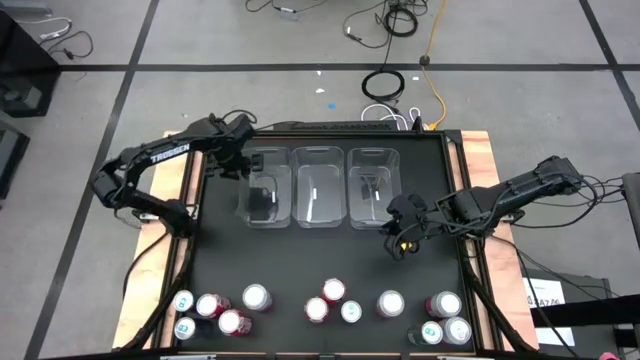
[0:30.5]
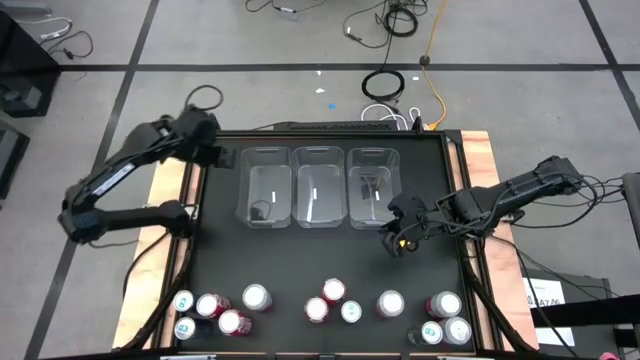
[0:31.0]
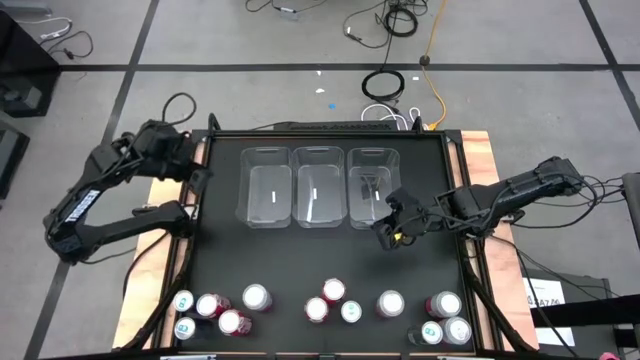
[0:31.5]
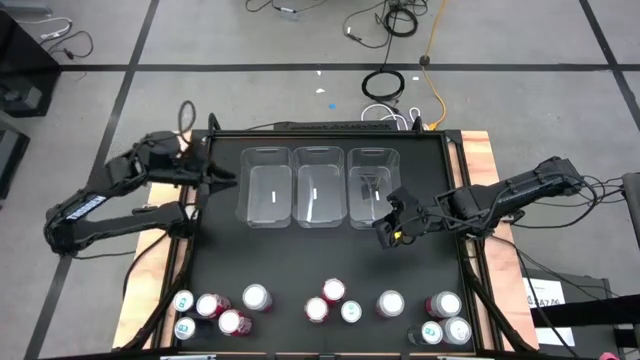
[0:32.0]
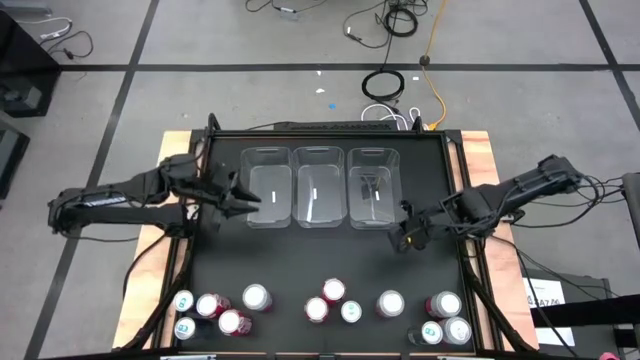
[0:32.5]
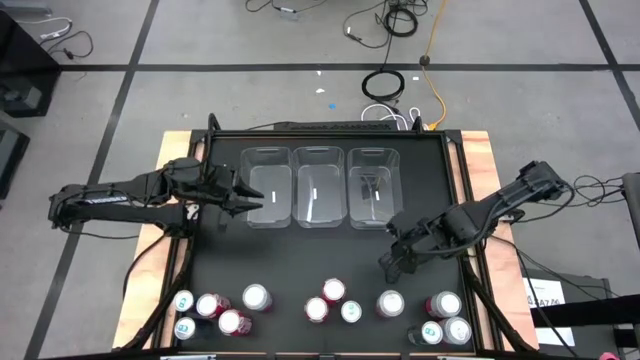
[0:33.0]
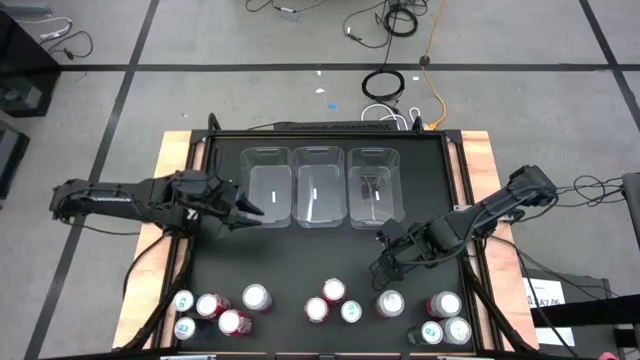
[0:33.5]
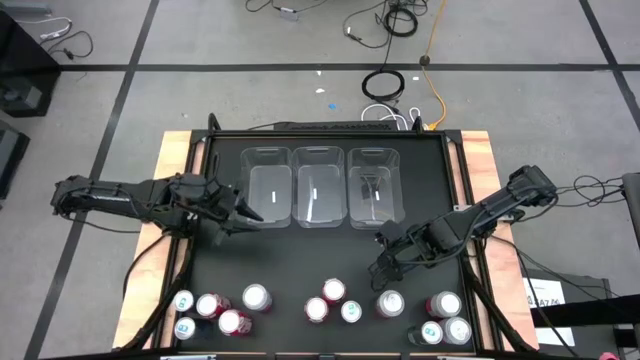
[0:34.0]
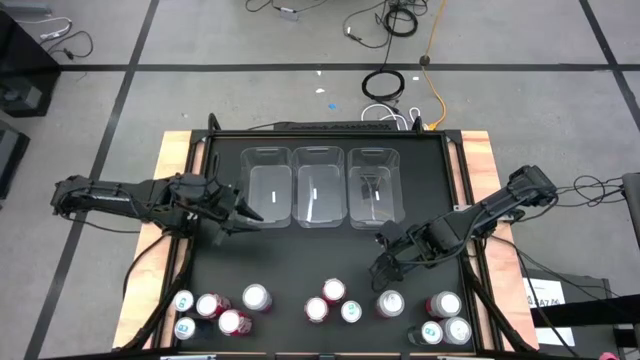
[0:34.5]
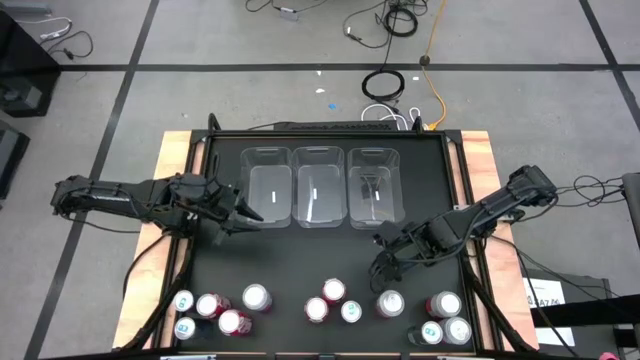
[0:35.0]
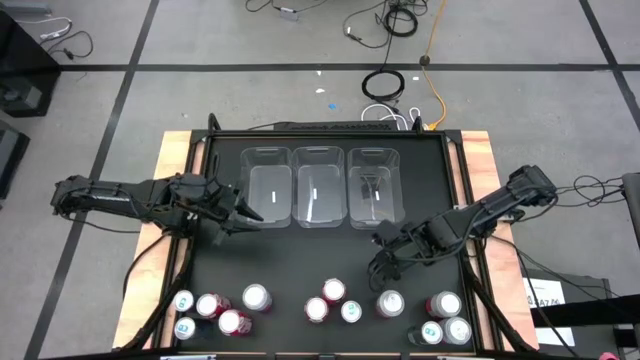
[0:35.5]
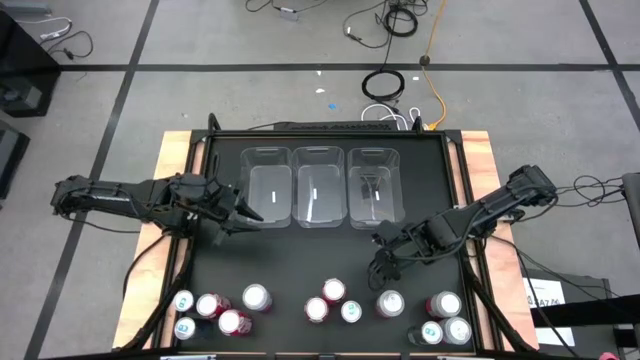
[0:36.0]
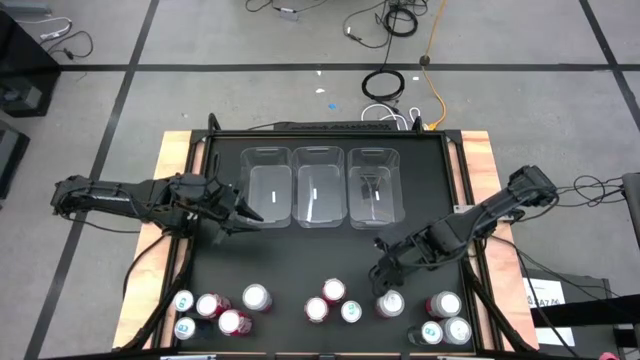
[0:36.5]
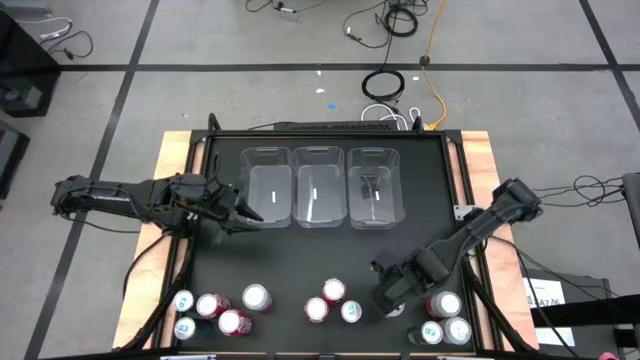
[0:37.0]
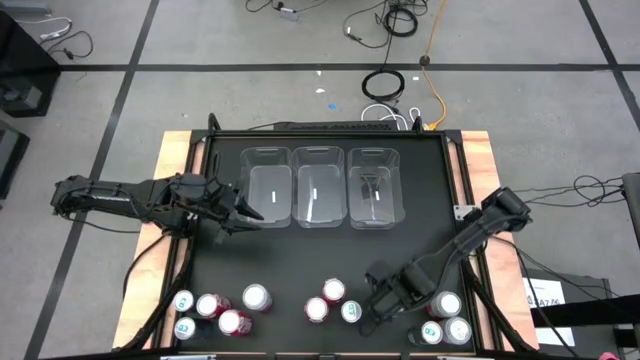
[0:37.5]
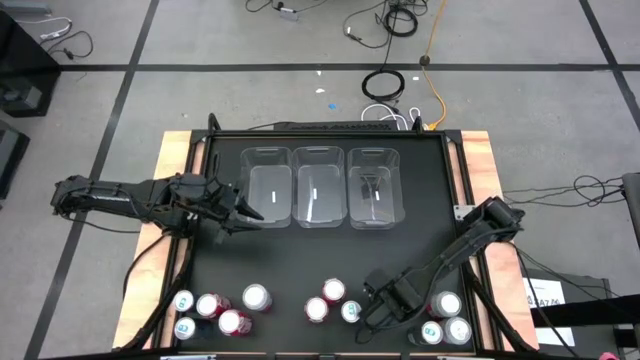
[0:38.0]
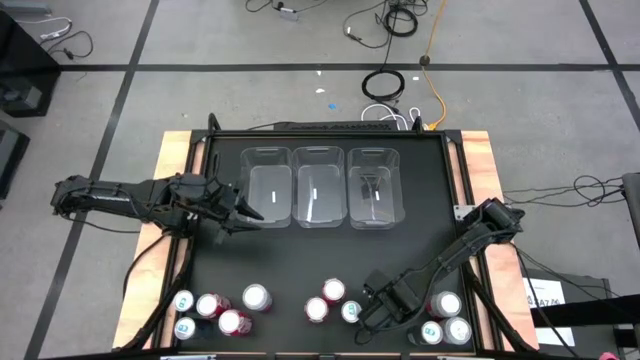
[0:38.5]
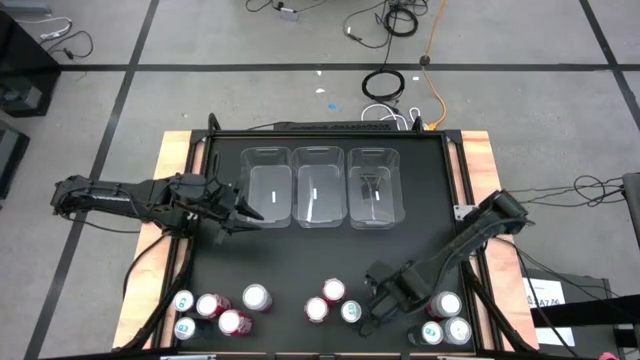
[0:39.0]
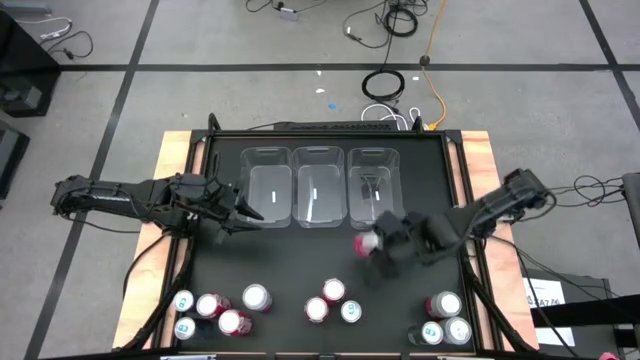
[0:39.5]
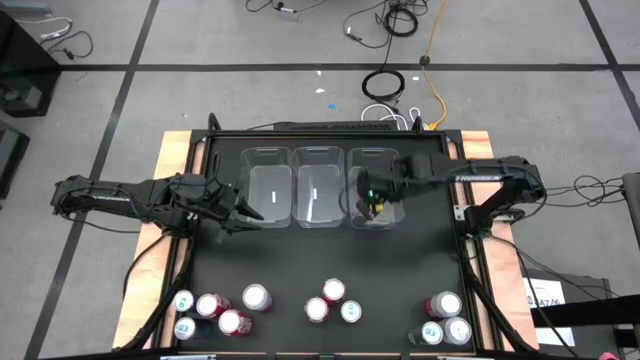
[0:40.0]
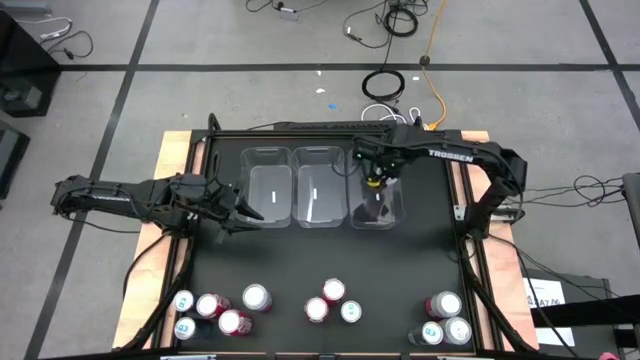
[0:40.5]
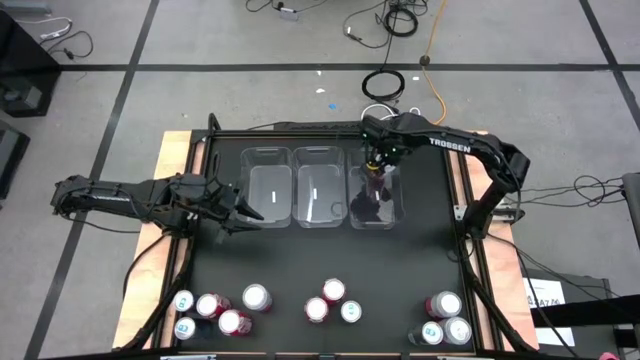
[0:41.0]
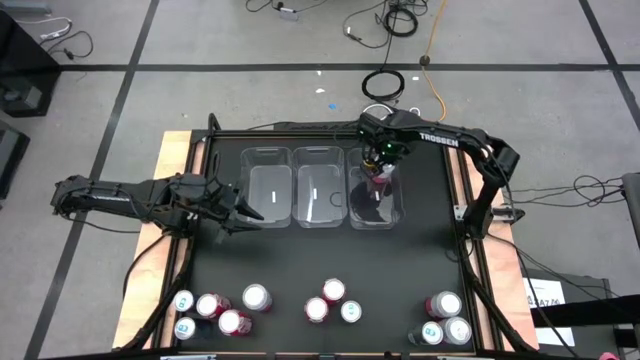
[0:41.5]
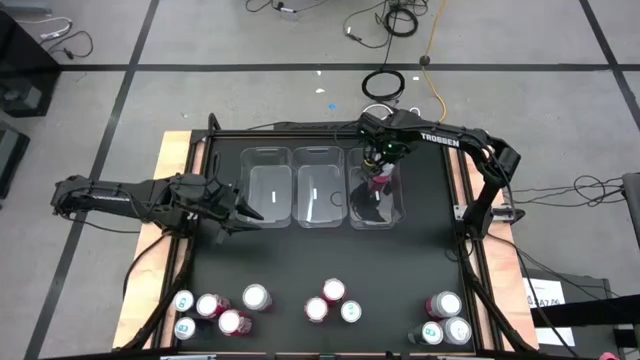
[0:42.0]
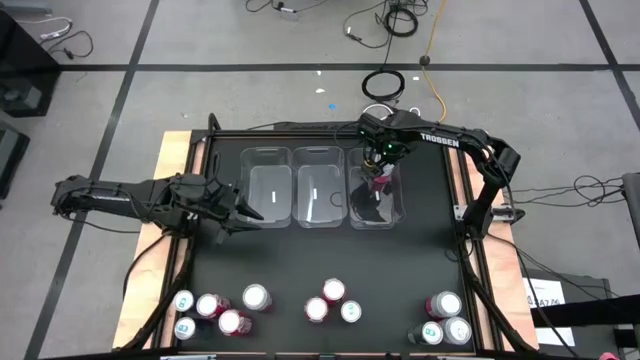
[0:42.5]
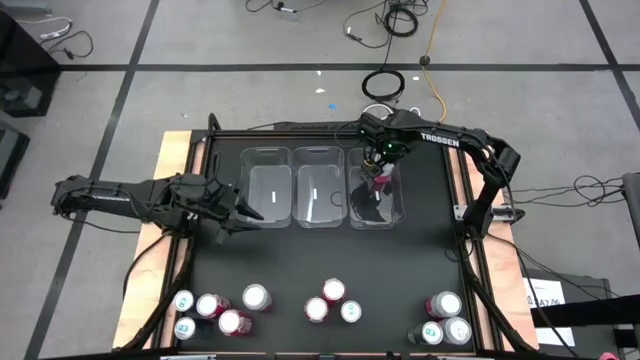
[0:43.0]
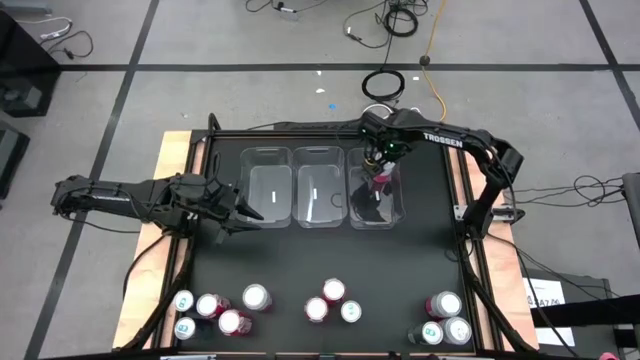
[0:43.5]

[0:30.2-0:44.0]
Task: Sort soda cans
Put the pink-white soda can into the right transparent bin
